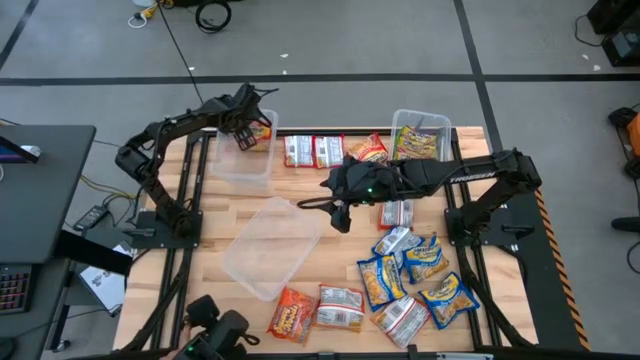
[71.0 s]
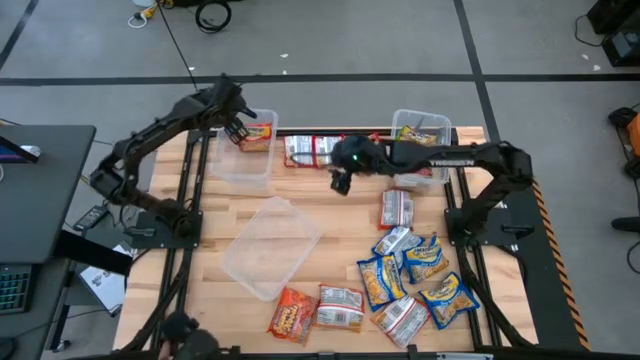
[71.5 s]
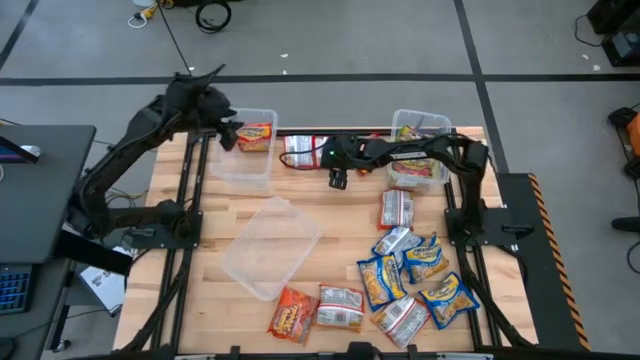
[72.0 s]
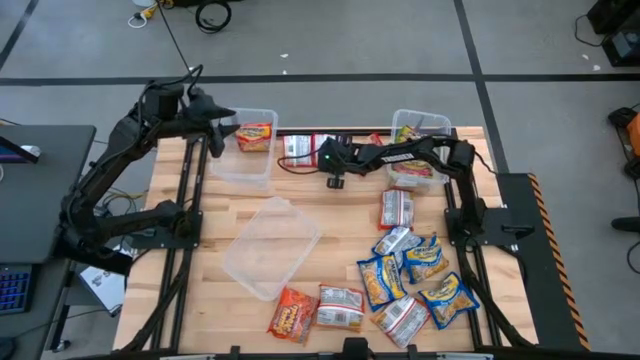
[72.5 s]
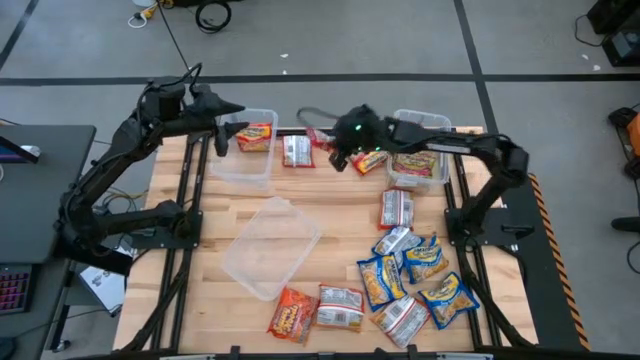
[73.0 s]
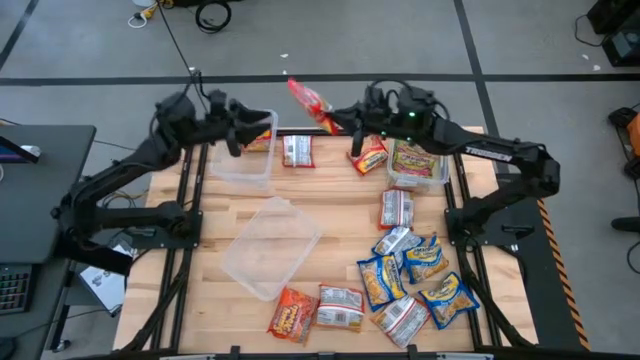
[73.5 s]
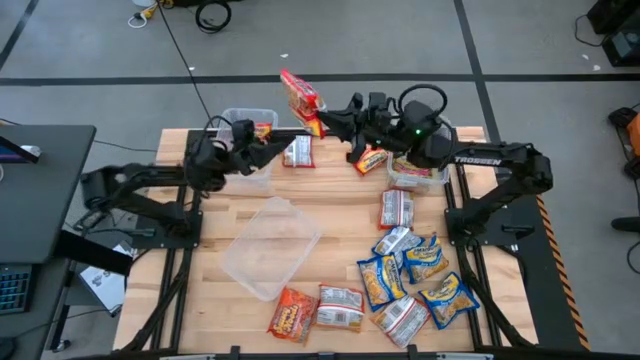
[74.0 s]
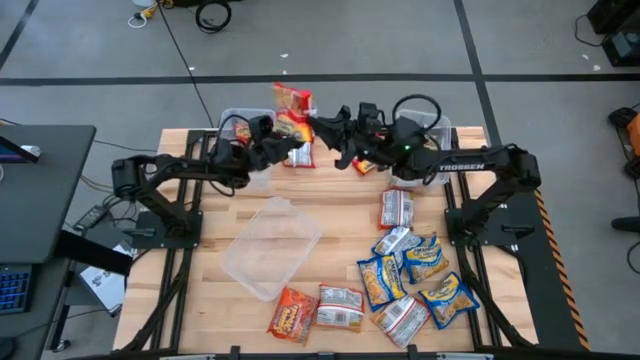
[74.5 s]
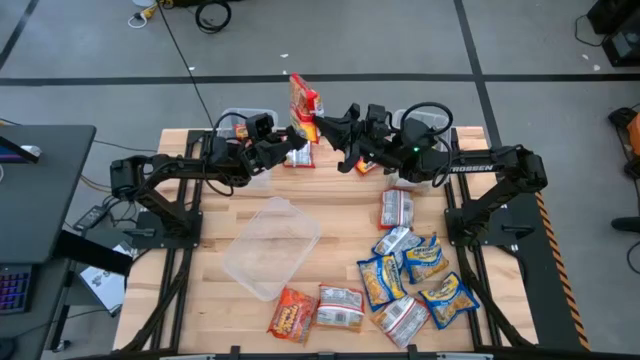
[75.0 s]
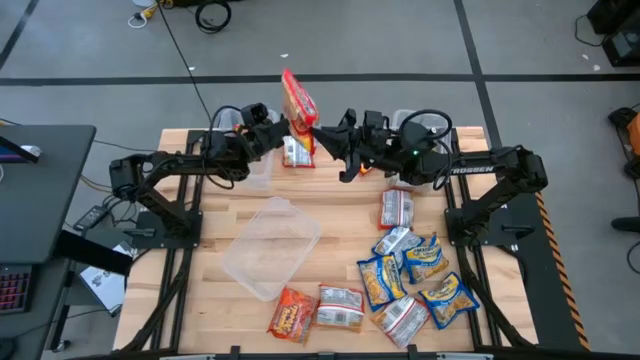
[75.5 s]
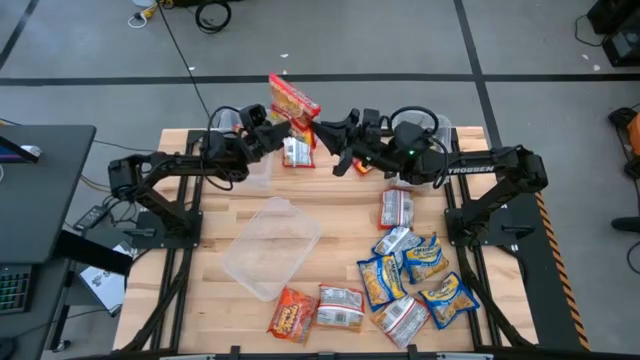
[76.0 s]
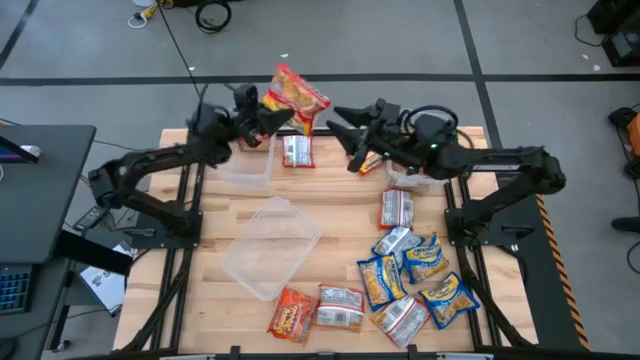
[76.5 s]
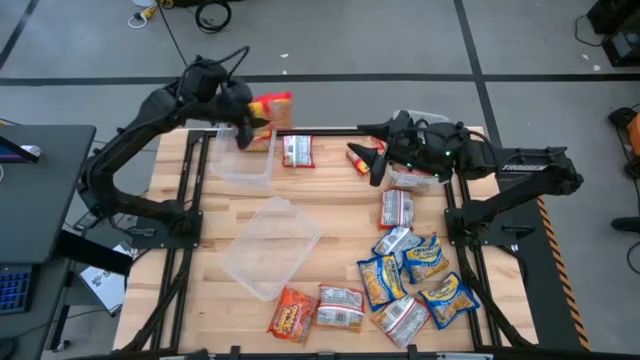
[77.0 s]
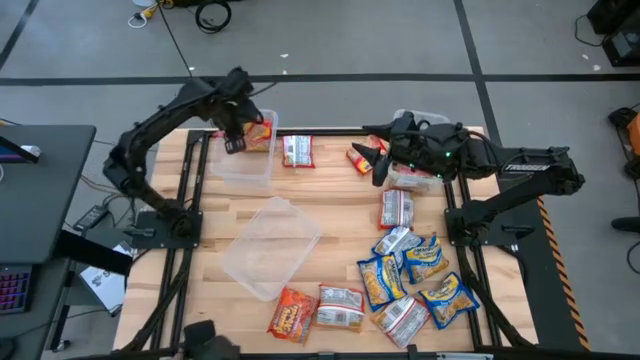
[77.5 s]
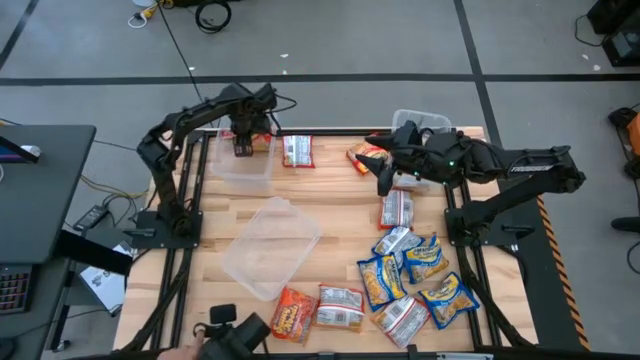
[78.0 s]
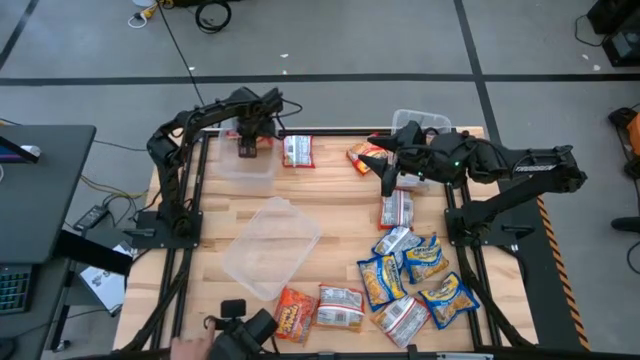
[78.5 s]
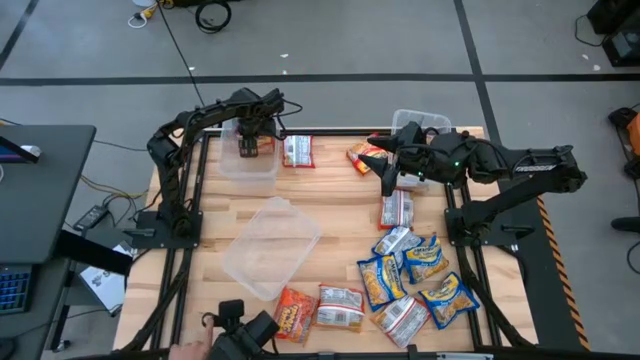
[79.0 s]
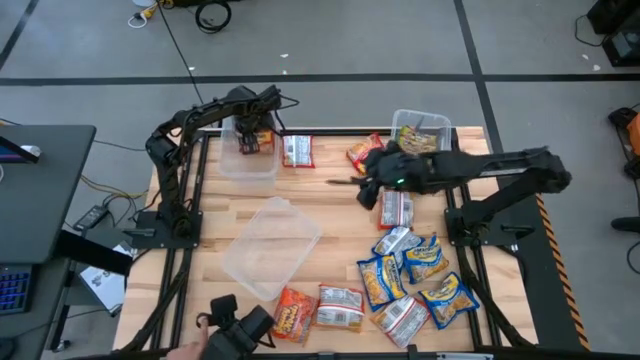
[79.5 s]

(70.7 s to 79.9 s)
Task: Sort Maruchan noodles
Put the orange noodle pack into the top left transparent bin

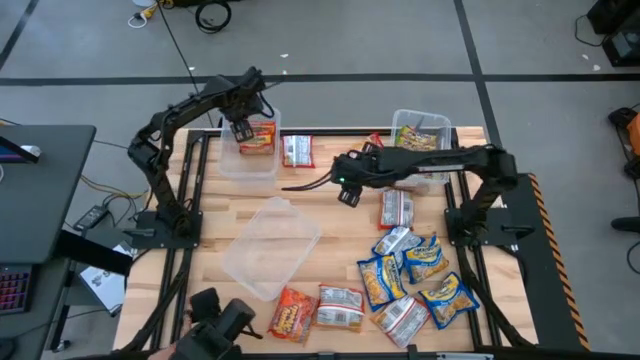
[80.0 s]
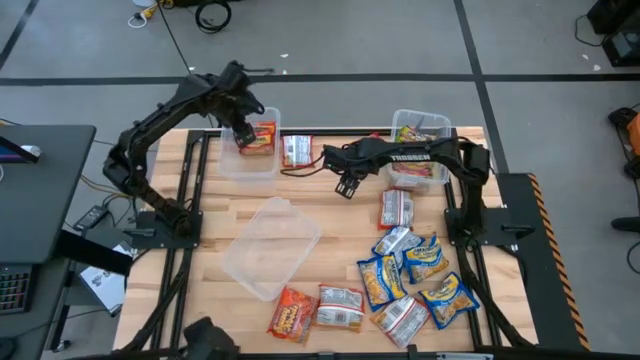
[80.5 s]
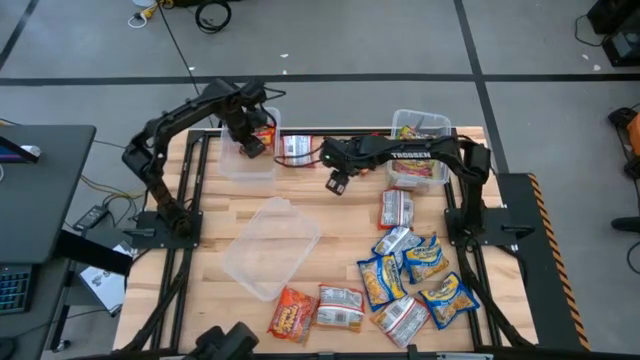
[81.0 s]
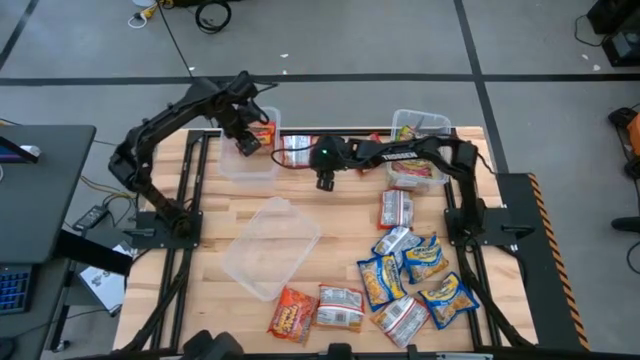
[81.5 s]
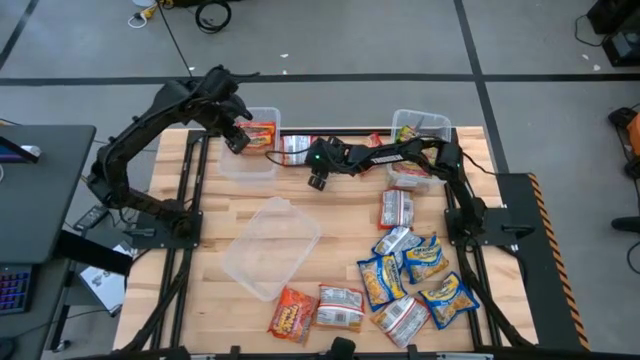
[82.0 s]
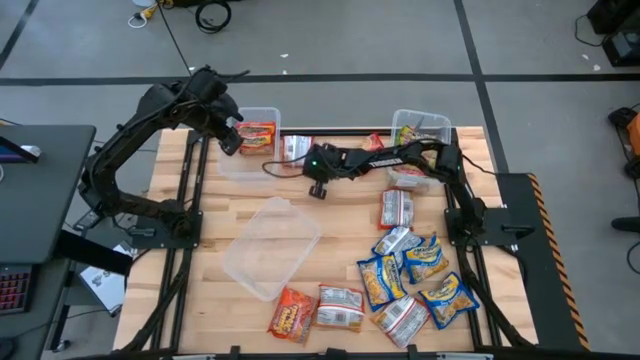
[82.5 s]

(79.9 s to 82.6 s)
Put the orange noodle pack into the top left transparent bin

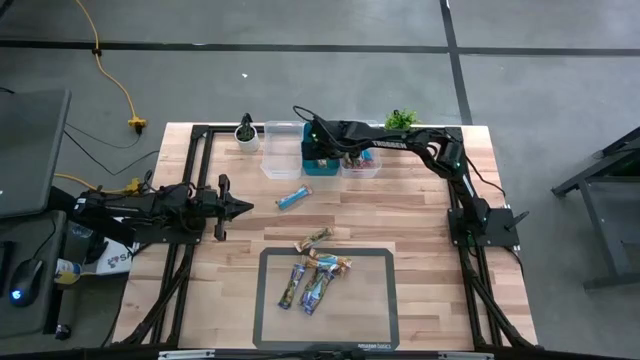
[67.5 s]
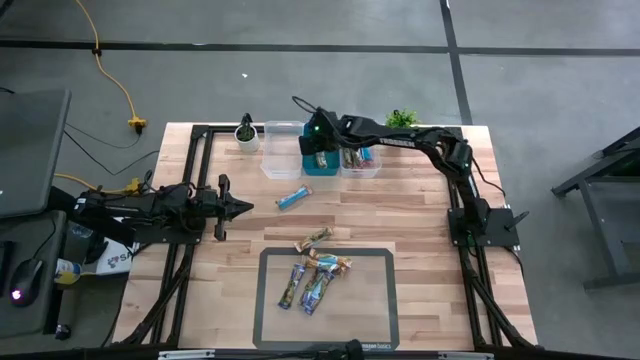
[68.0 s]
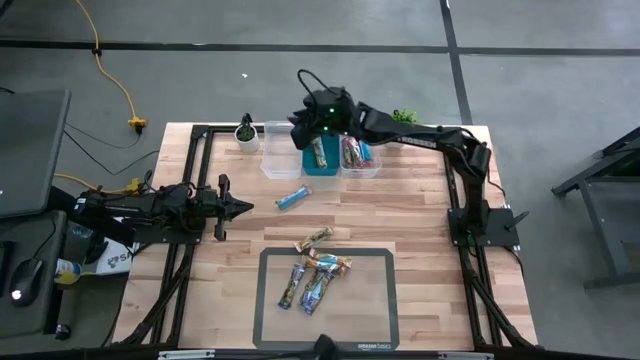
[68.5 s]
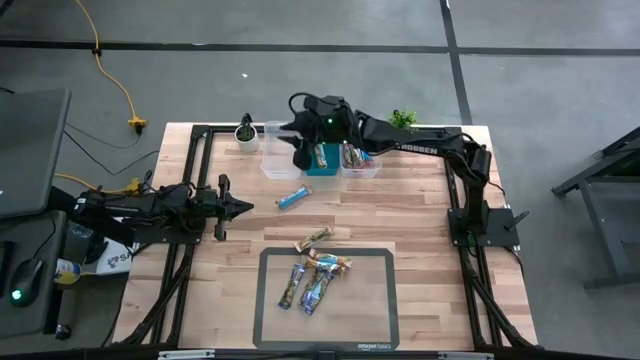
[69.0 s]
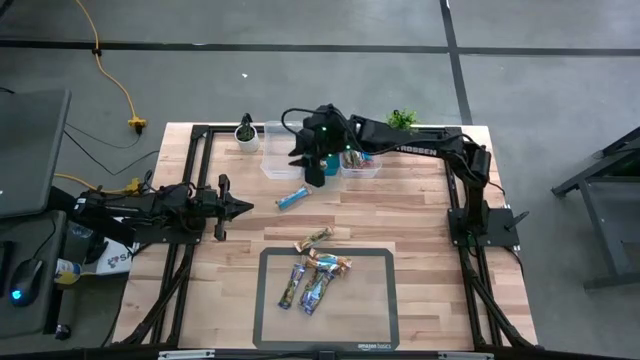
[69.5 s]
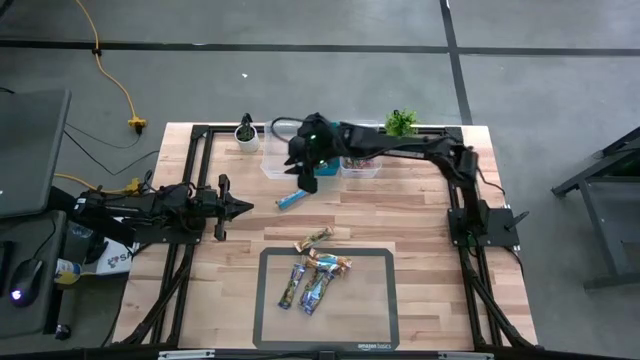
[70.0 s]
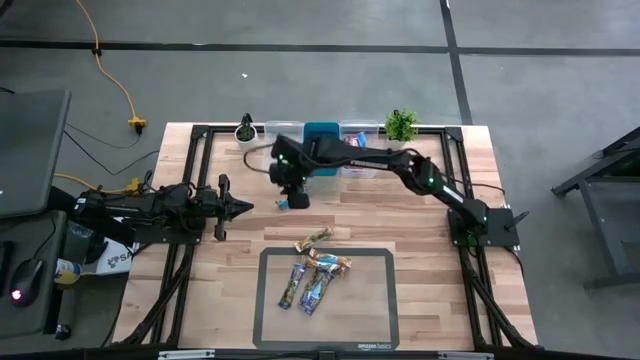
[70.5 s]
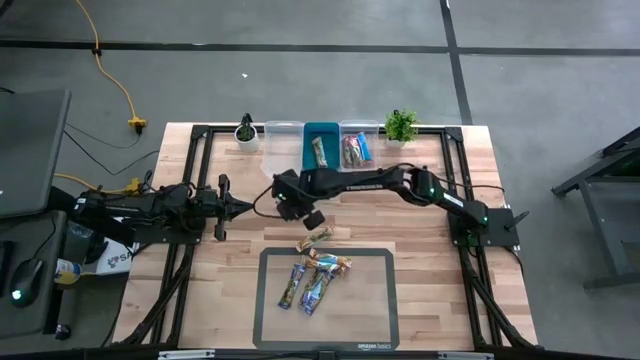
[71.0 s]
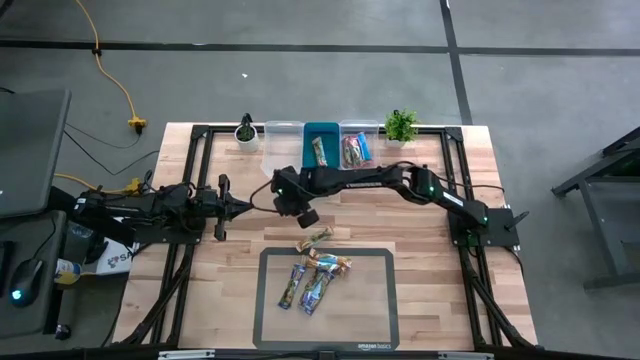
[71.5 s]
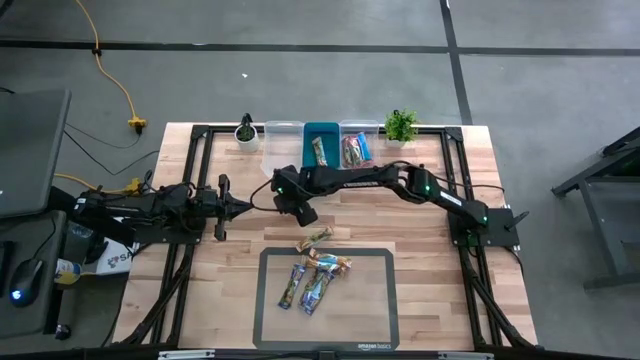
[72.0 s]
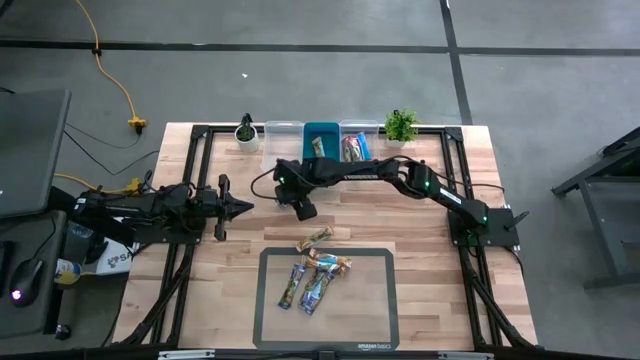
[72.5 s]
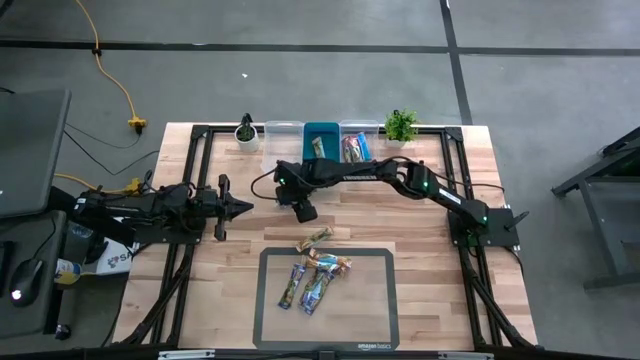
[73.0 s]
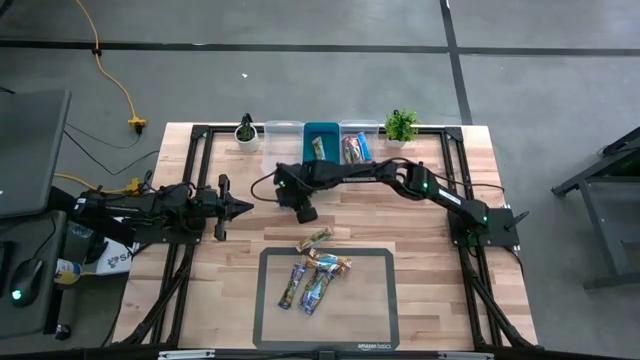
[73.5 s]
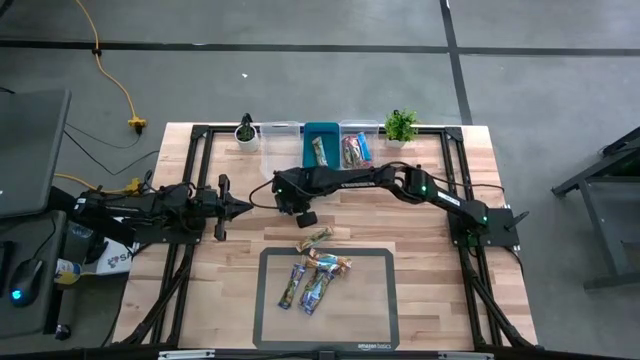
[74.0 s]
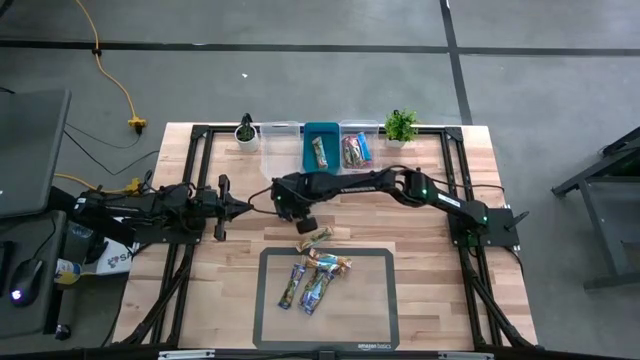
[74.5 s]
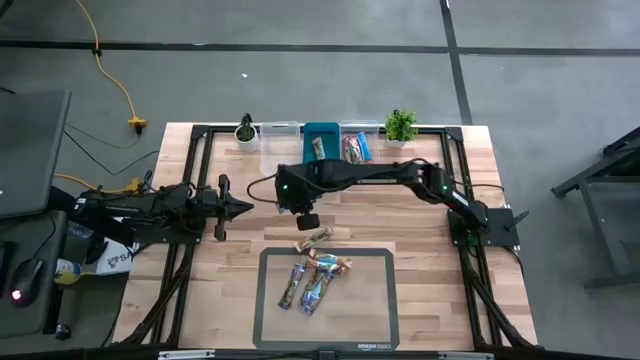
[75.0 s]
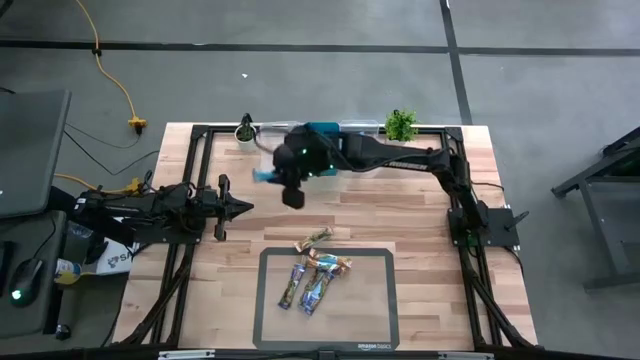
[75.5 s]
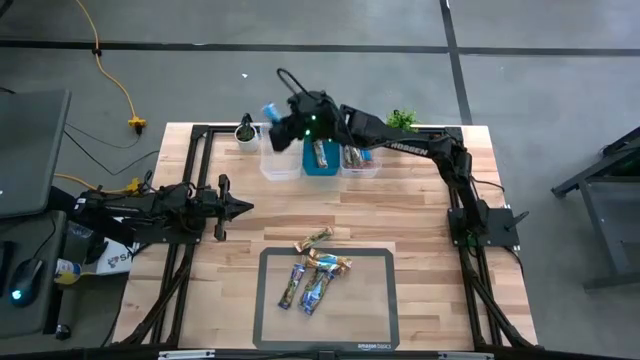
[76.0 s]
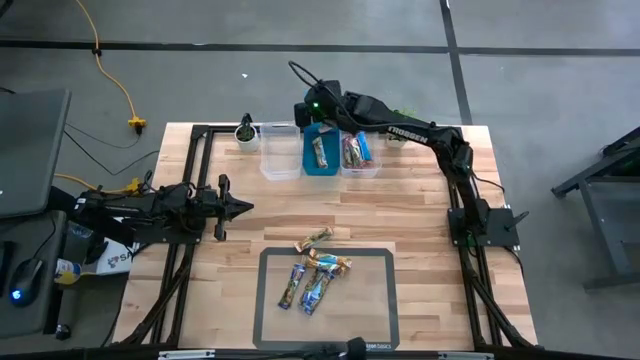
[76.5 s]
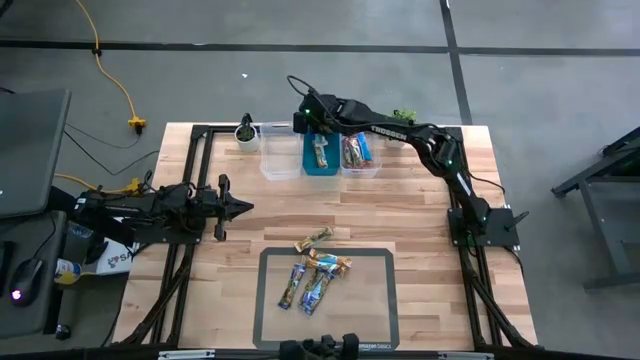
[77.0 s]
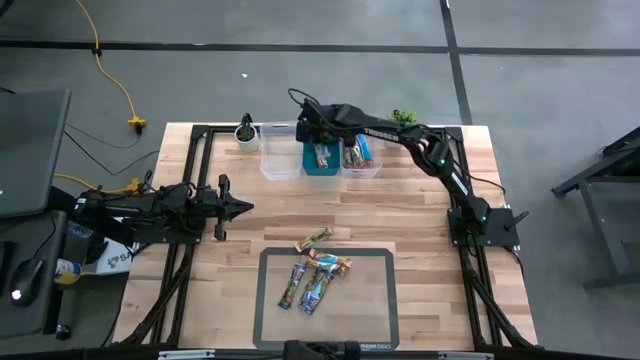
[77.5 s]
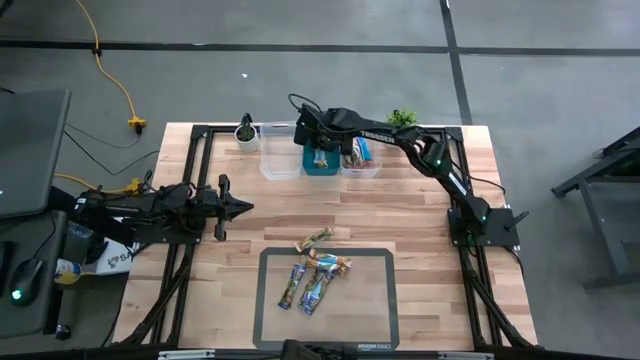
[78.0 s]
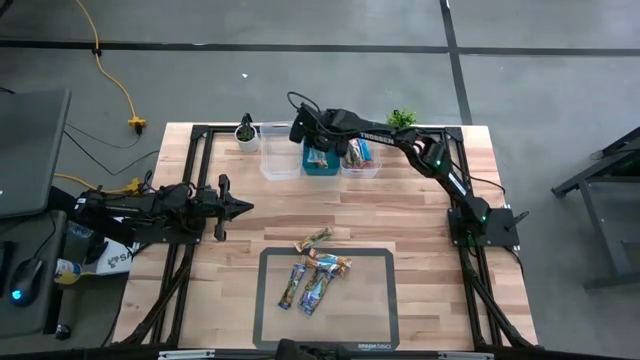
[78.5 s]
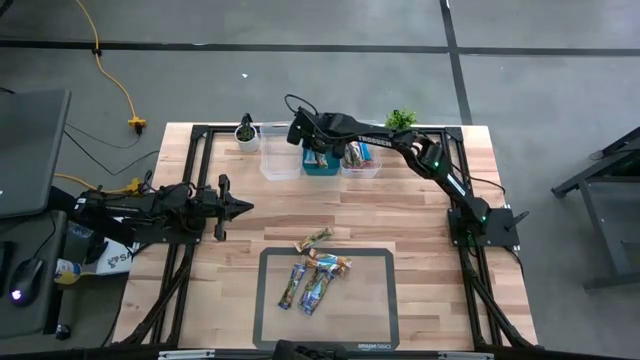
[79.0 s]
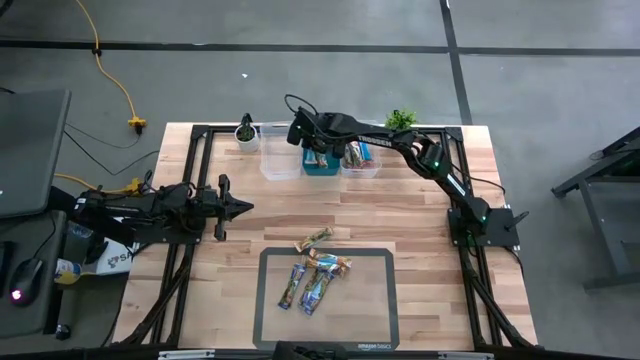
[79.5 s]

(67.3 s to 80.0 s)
Task: Pick and place Granola Bars by type
Put the yellow granola bar into the blue bin
